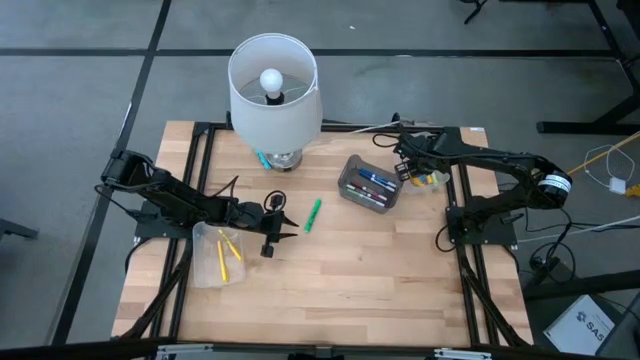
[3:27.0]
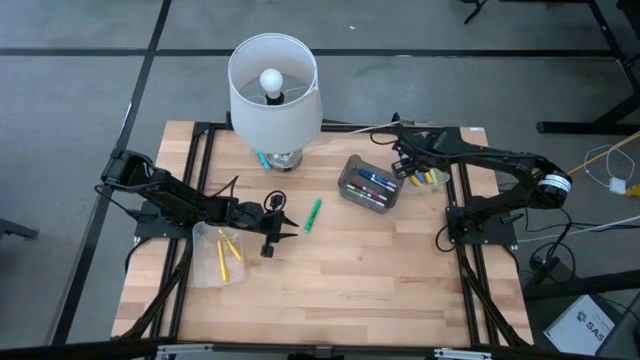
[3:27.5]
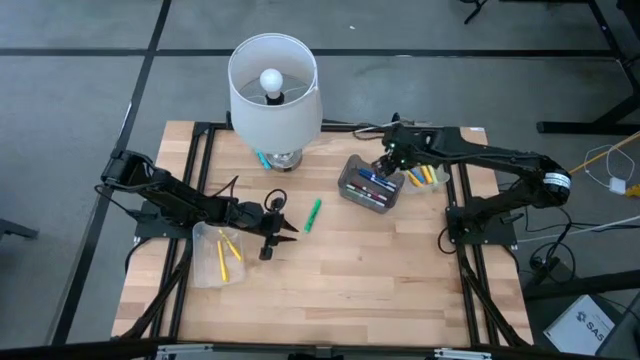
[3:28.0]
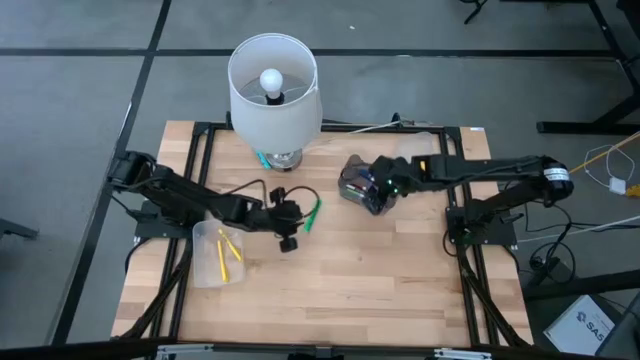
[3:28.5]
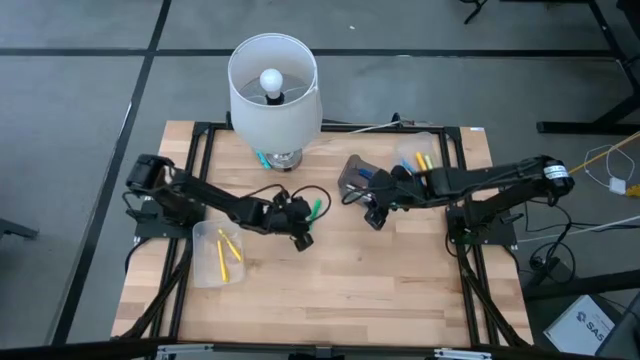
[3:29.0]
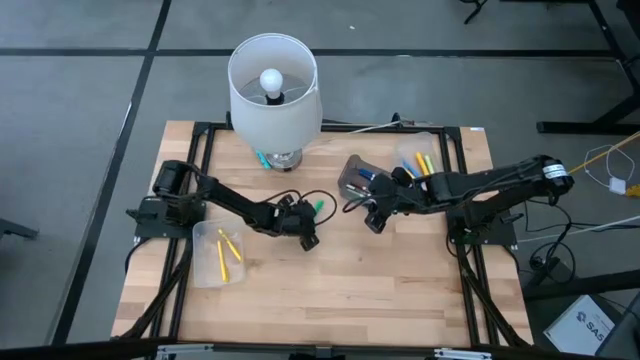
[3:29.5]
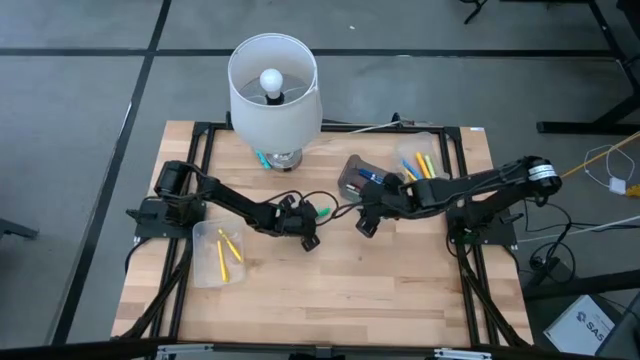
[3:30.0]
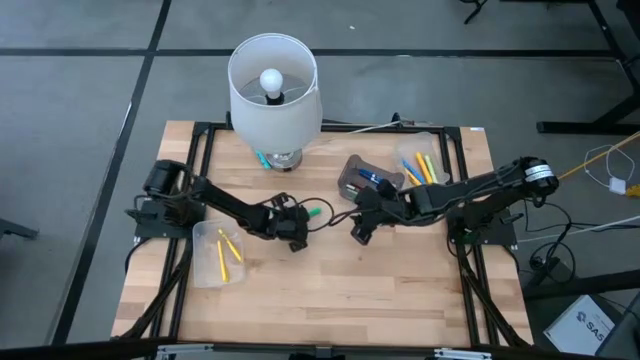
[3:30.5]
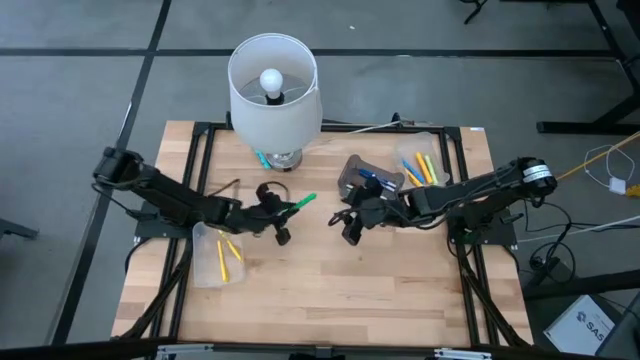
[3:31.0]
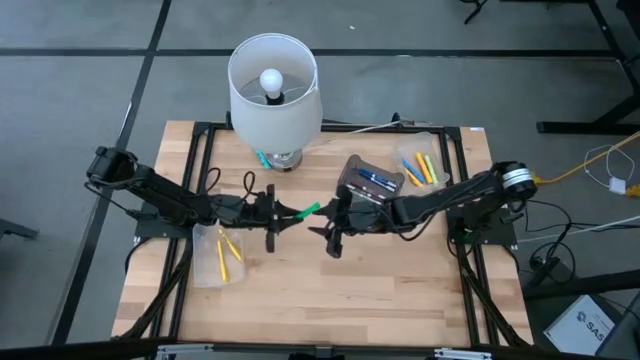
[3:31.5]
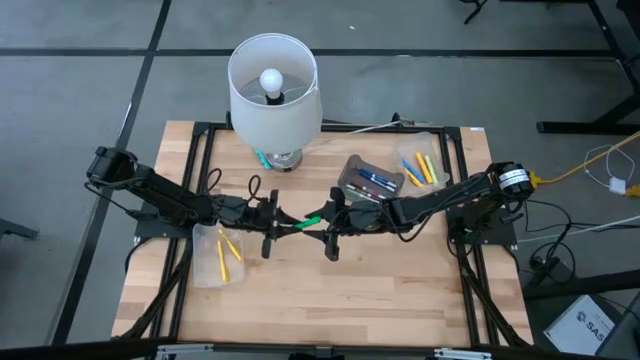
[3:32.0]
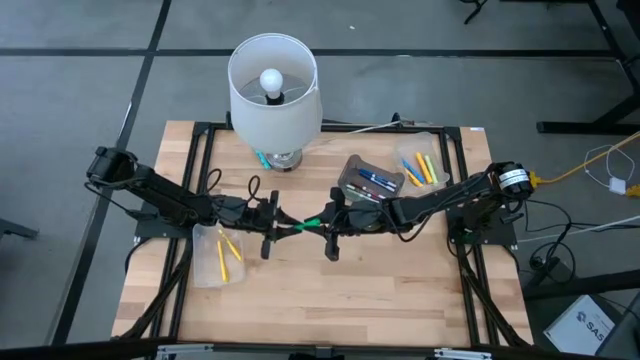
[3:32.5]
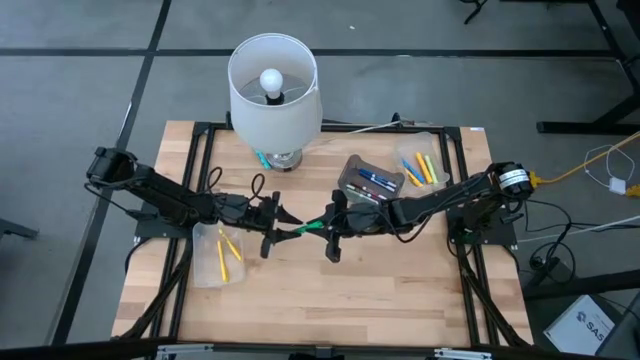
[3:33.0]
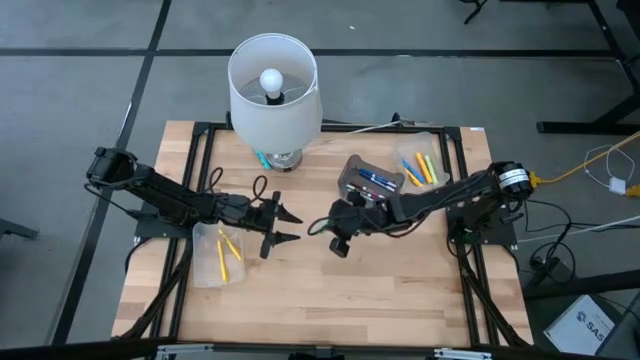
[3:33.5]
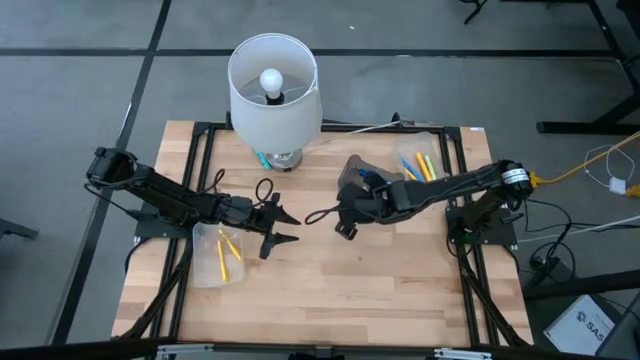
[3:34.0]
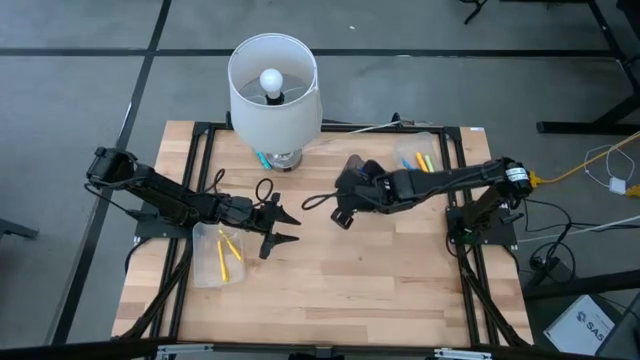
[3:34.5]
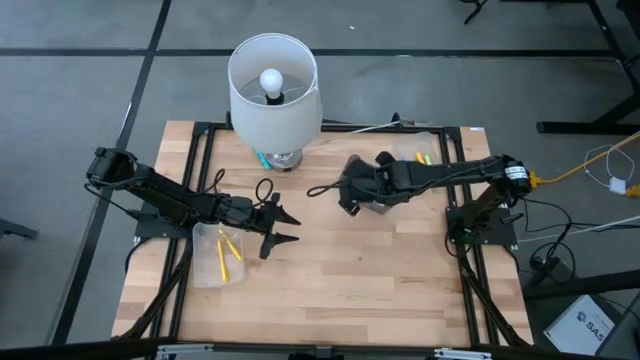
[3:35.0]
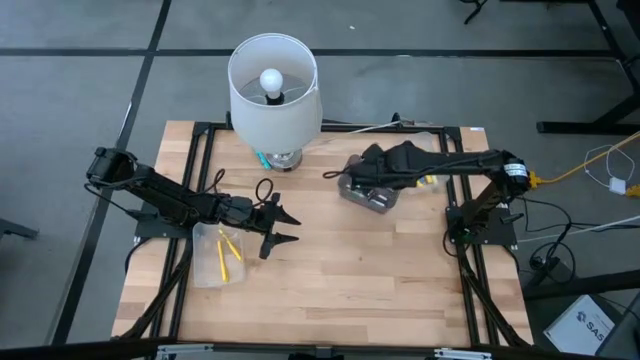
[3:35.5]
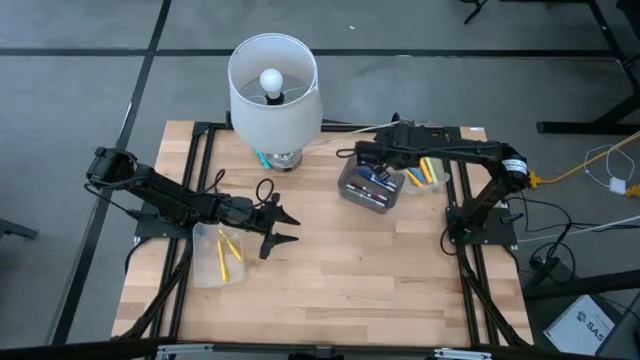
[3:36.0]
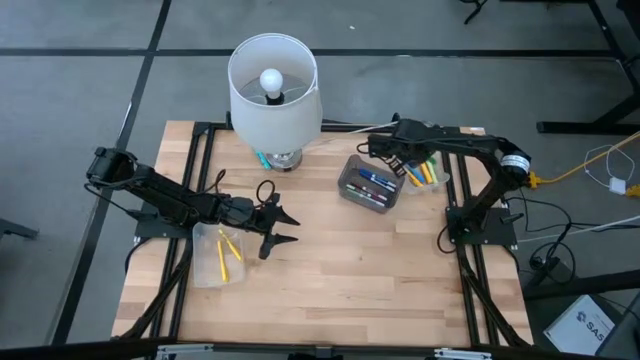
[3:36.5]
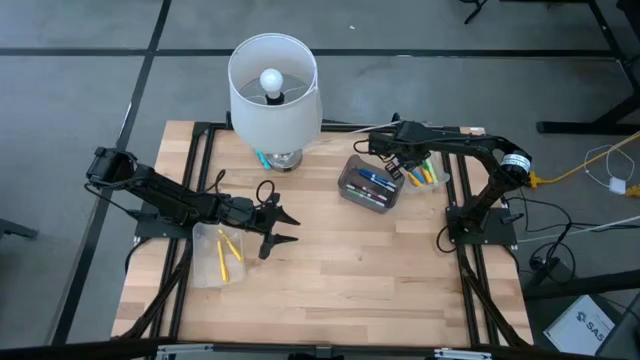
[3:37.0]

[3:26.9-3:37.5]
Task: Pick & Place Markers
Put the green highlighter pen into the right transparent bin

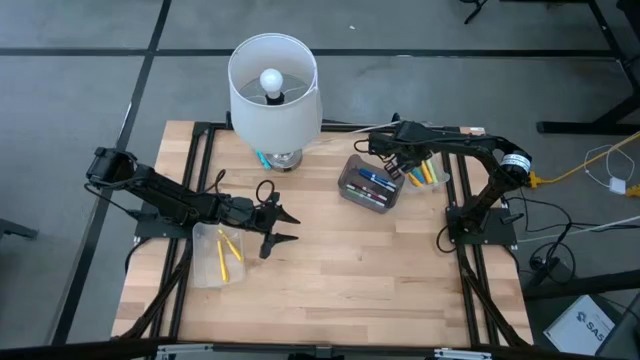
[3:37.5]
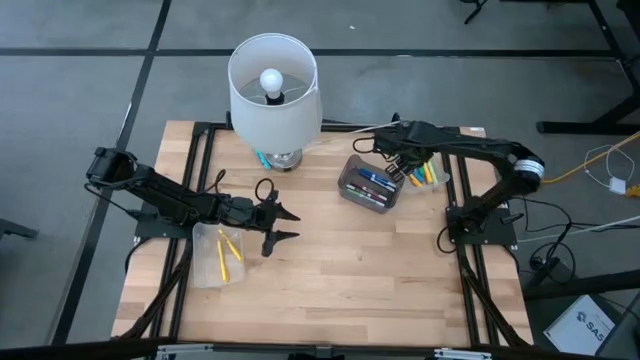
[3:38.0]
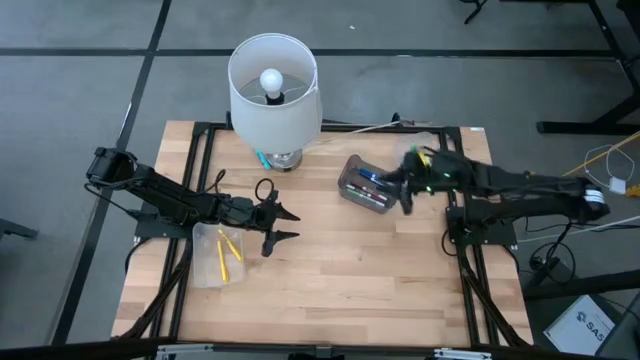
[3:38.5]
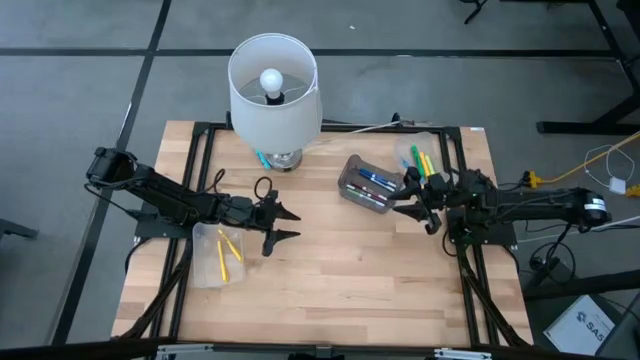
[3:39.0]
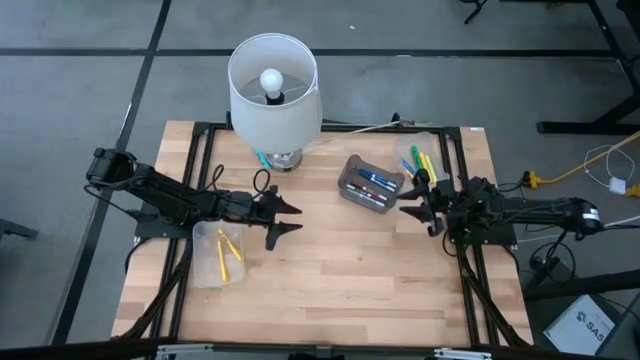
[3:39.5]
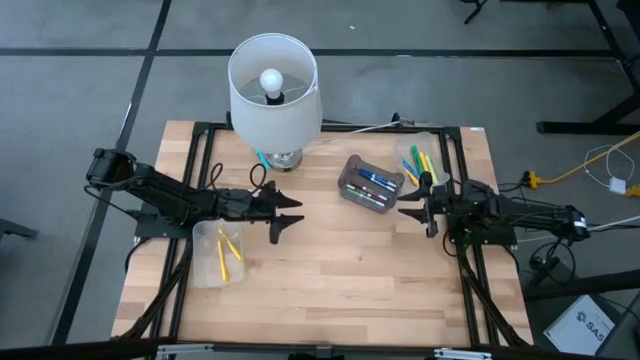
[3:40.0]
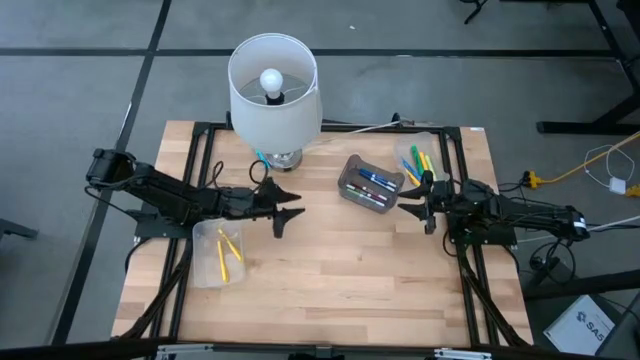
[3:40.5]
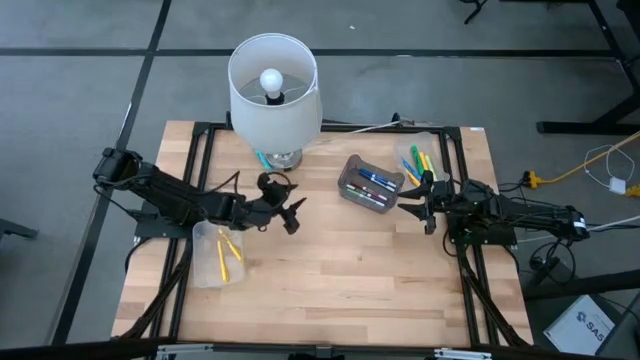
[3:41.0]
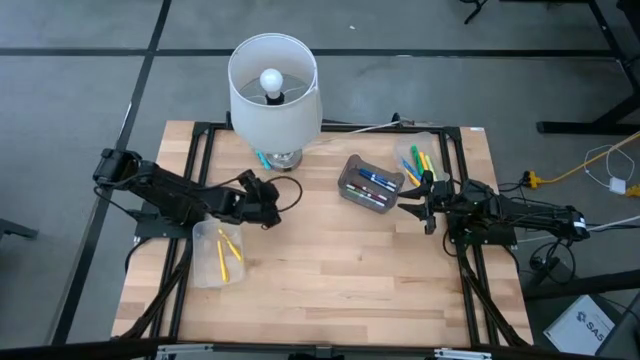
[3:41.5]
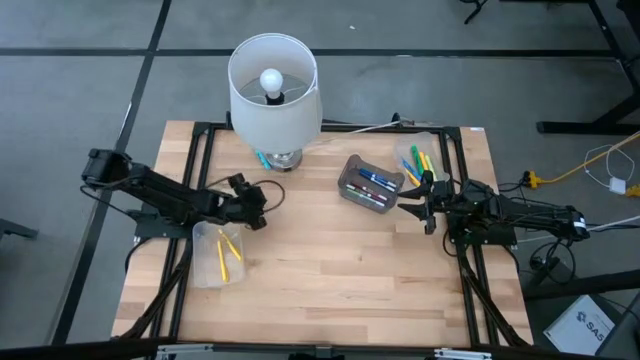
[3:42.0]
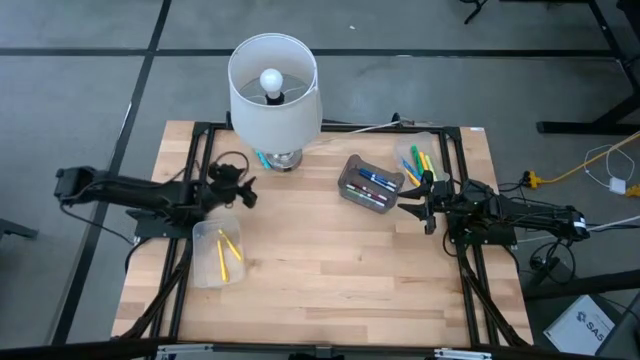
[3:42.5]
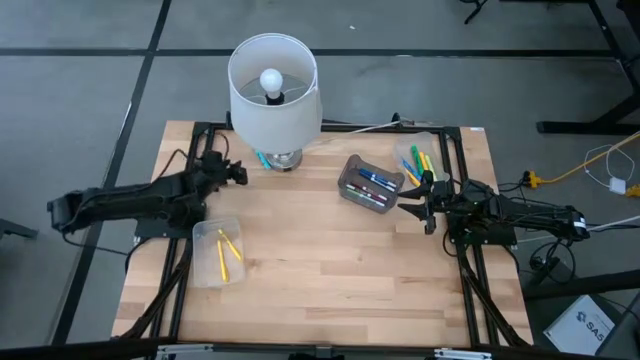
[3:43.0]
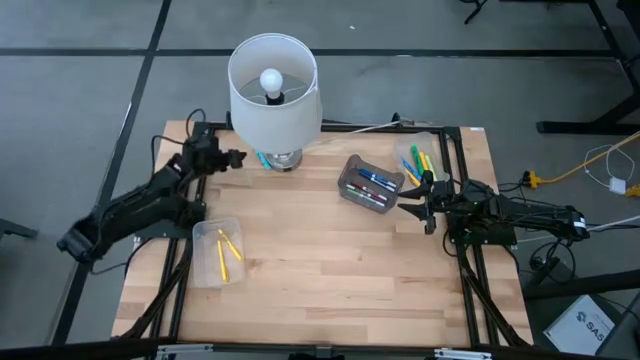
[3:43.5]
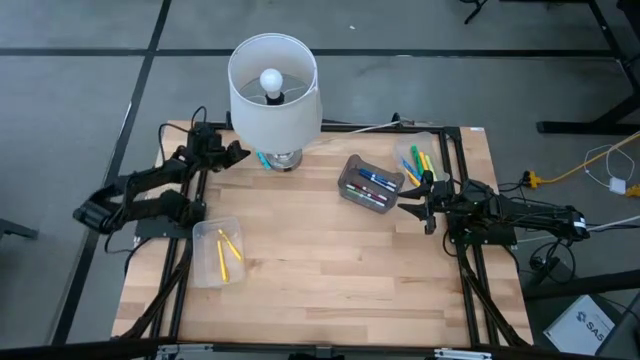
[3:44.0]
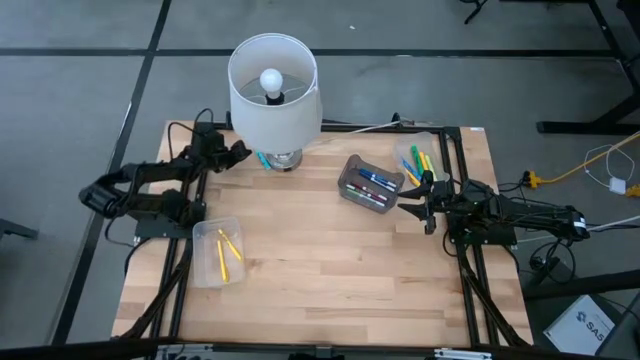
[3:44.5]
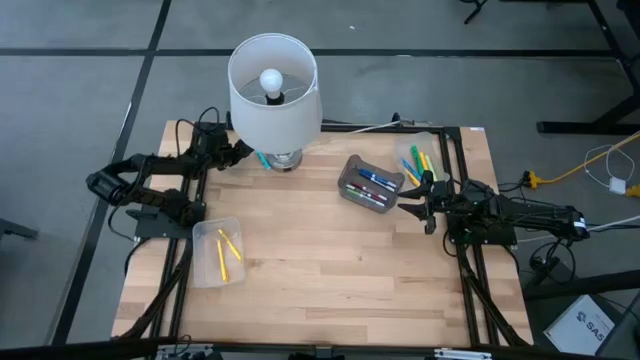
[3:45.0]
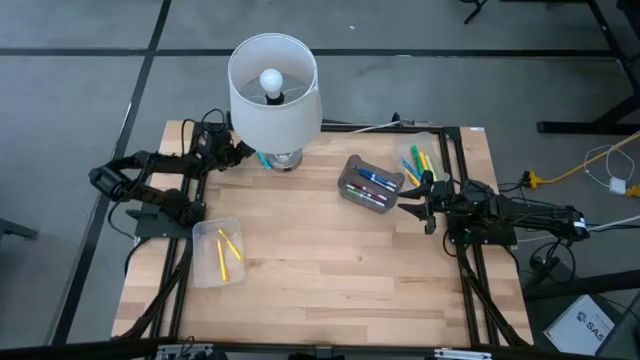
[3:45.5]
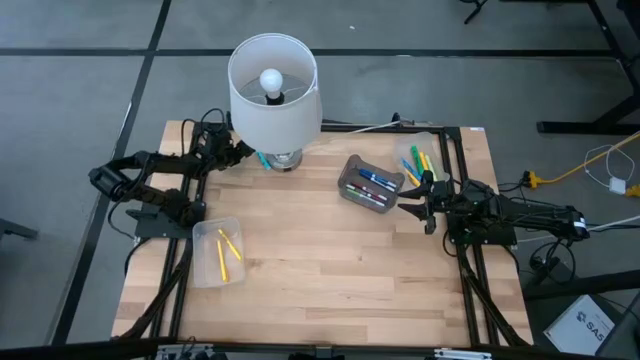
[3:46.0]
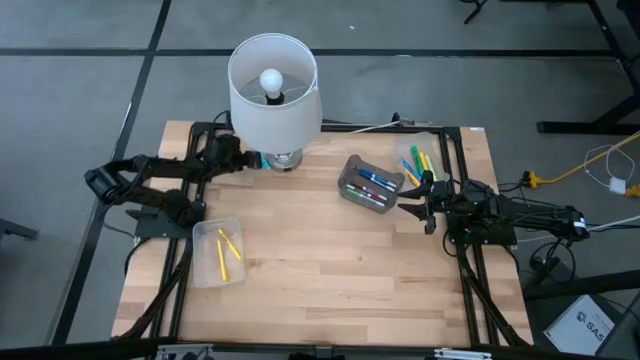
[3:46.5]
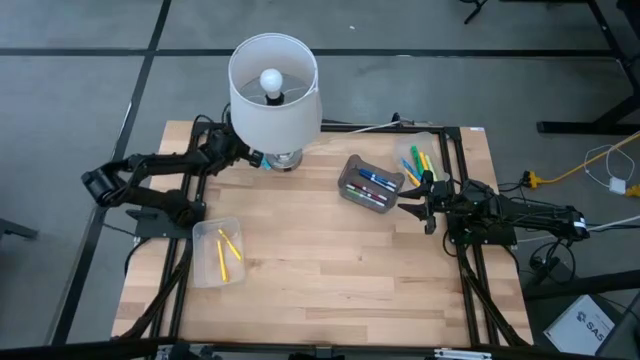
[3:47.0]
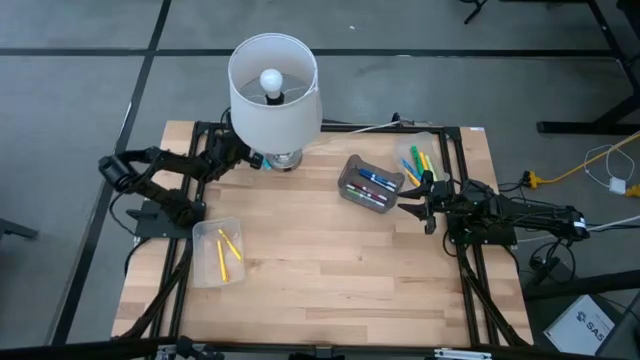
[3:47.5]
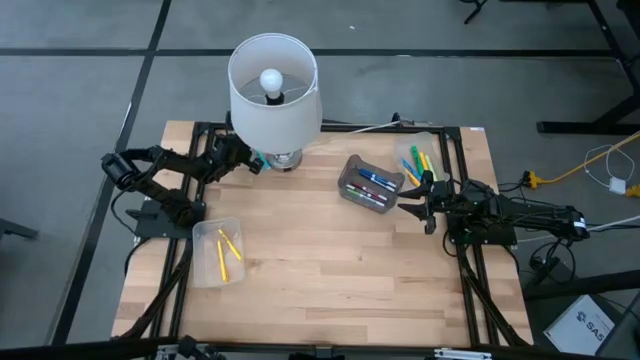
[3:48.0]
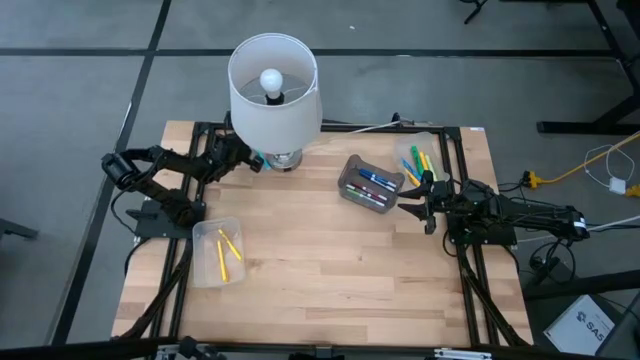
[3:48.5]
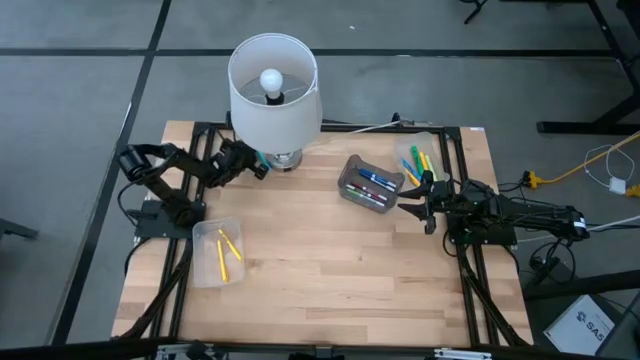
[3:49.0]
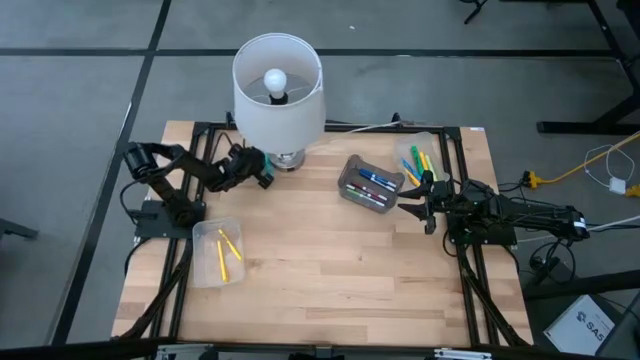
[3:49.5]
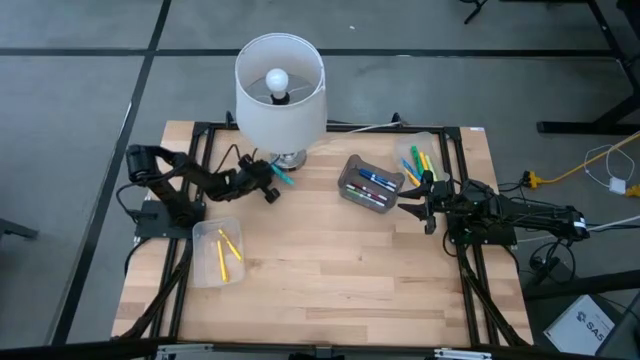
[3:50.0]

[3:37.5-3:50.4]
Put the light blue highlighter pen into the right transparent bin
